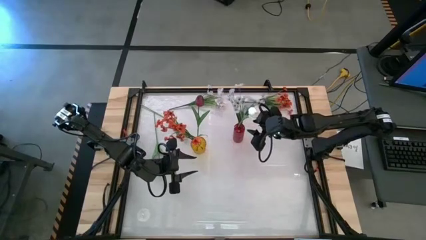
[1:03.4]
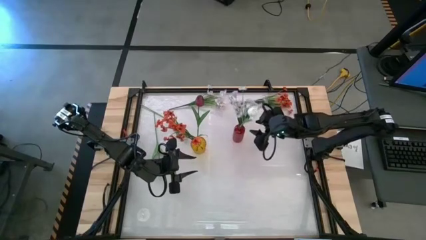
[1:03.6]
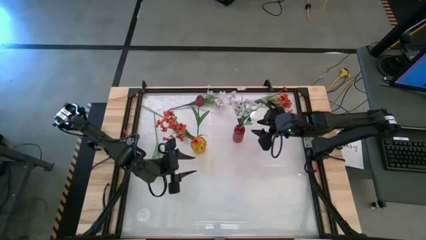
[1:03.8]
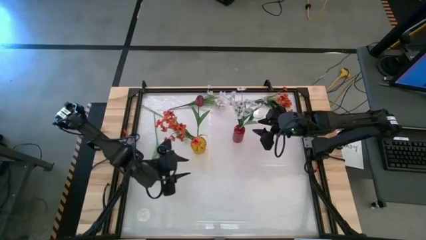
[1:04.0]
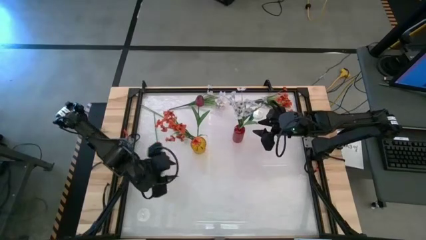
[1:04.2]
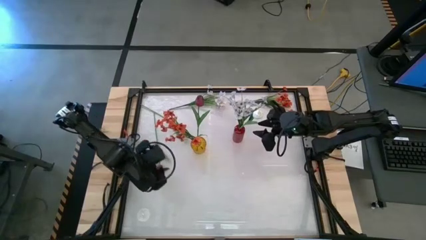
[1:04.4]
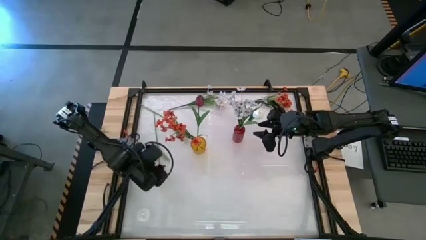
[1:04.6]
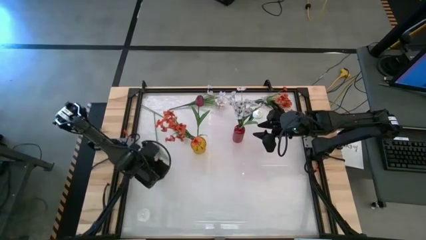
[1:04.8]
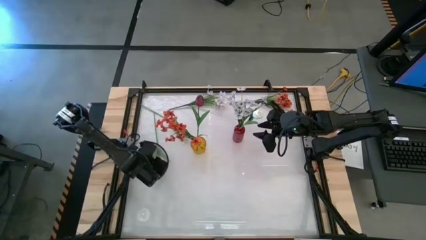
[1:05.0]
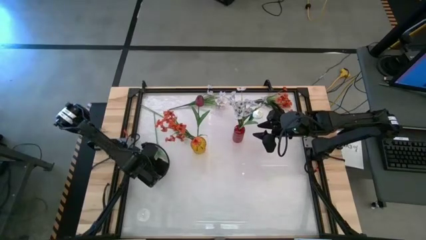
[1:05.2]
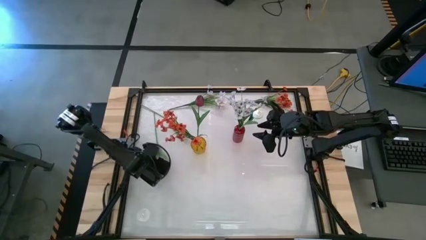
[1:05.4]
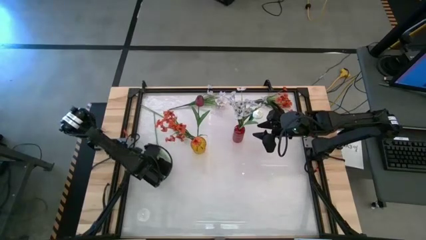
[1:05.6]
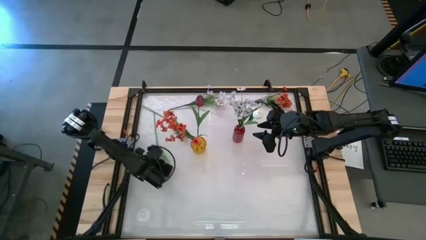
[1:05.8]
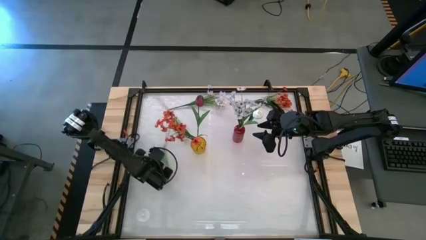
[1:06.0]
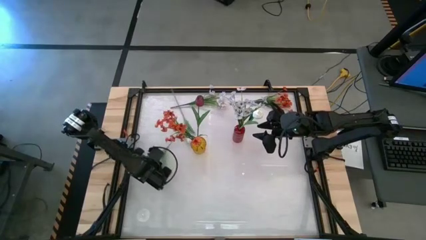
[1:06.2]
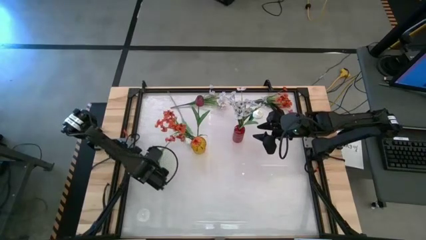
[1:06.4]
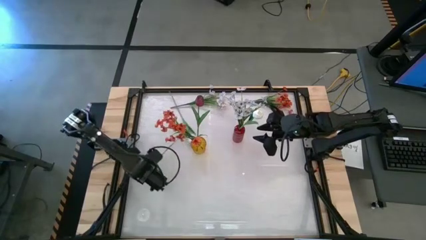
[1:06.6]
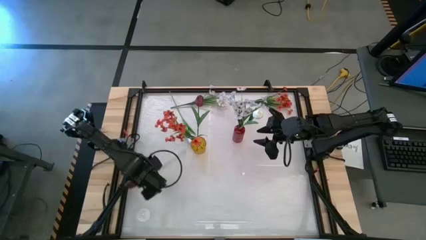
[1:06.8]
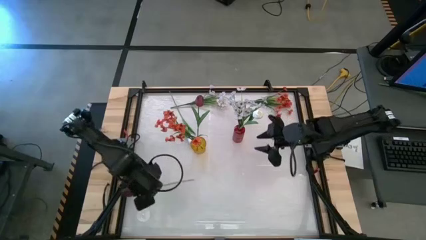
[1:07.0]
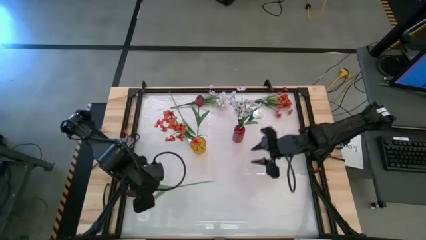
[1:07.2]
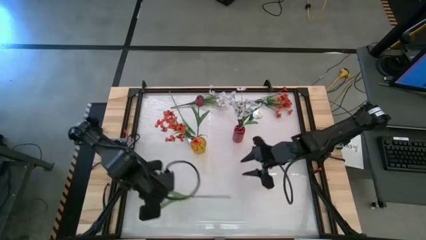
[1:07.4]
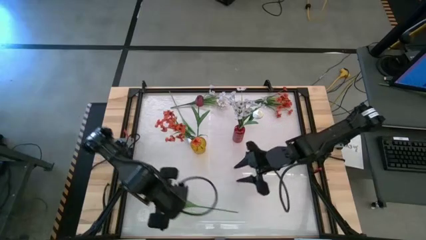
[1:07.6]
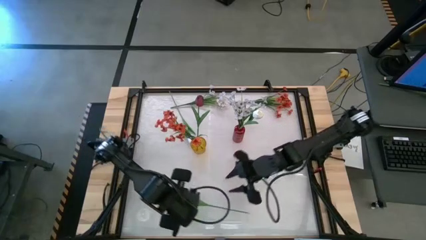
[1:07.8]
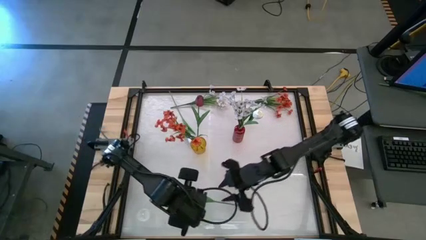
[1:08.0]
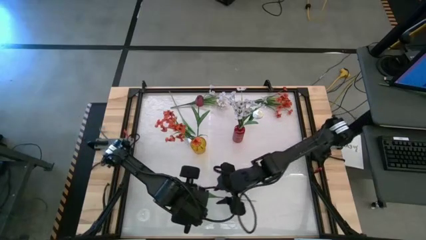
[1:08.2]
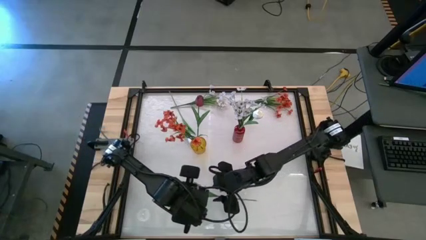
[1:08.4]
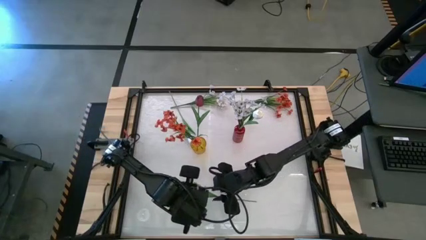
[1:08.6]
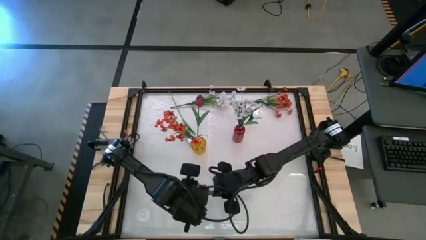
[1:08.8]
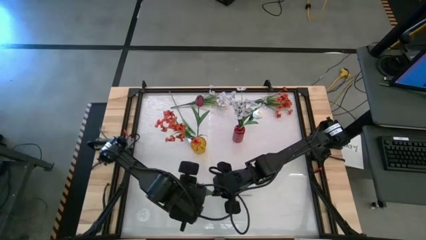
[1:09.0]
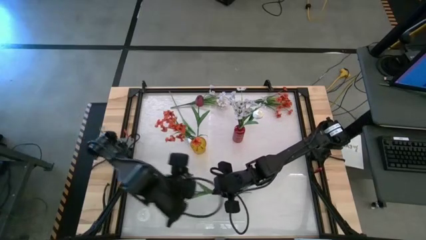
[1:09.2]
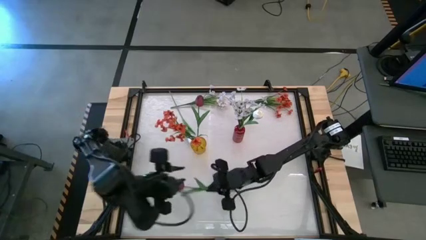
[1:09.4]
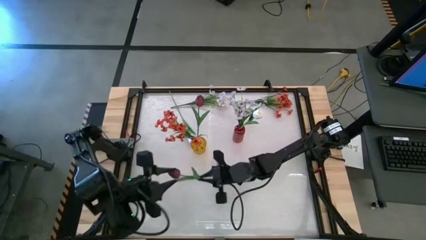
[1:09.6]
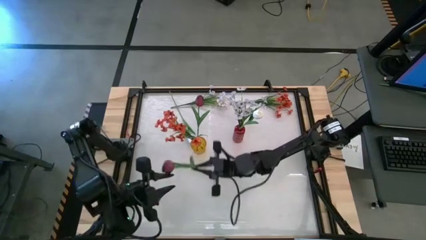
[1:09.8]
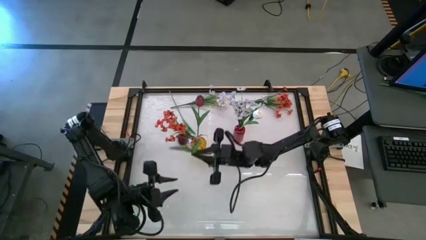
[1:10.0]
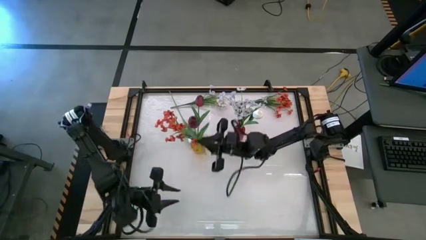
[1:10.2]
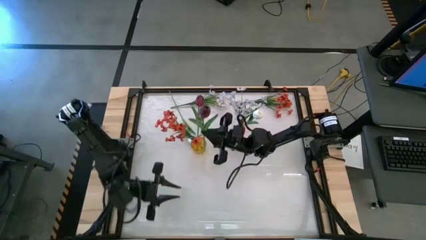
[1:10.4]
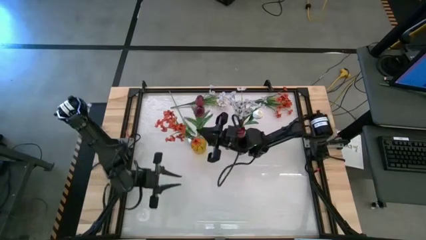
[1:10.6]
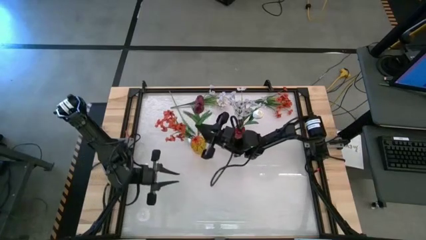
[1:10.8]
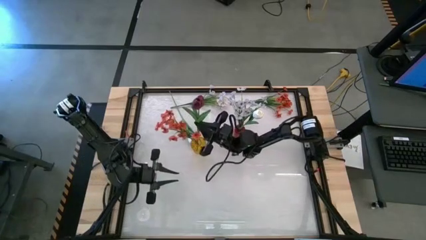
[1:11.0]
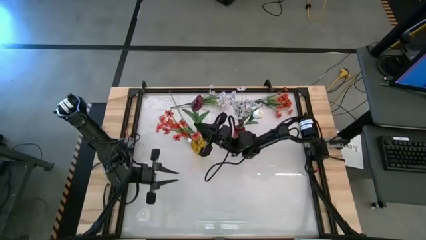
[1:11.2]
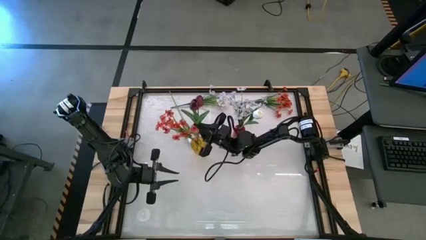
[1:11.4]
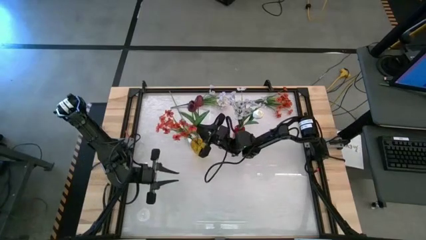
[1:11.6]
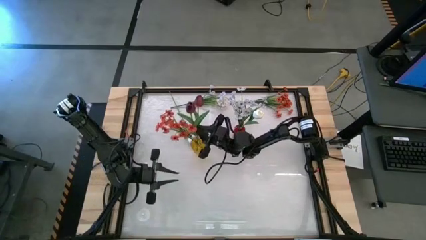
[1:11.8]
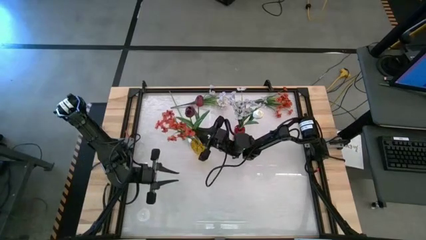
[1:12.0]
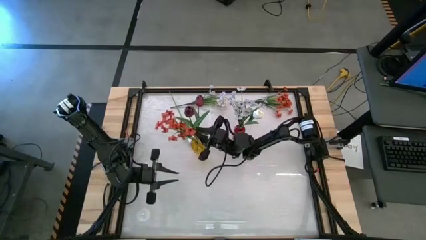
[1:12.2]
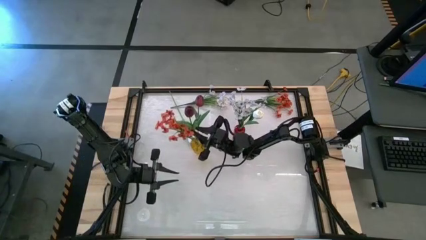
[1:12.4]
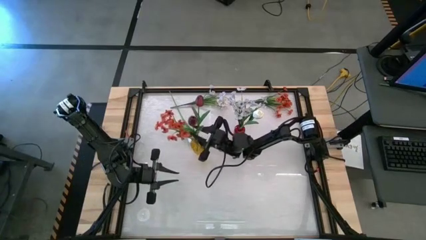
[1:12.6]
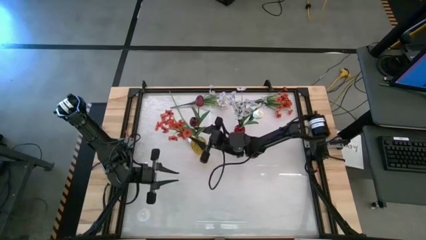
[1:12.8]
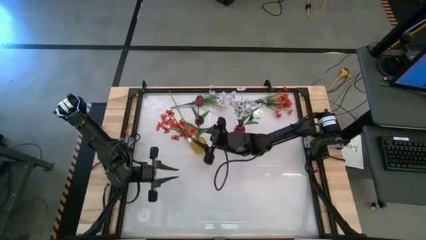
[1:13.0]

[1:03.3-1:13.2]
Task: Sort flowers into vase by color
Put the red tulip into the yellow flower vase

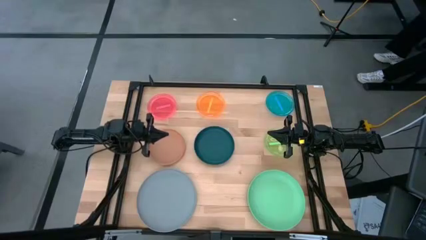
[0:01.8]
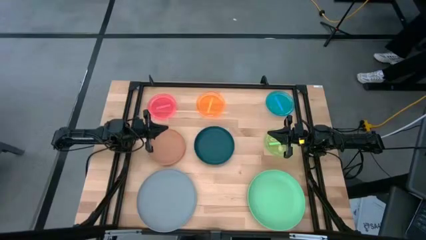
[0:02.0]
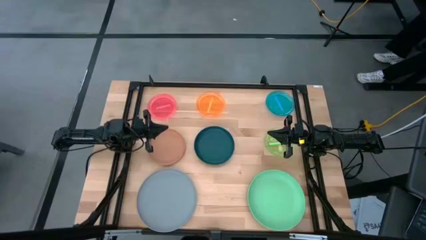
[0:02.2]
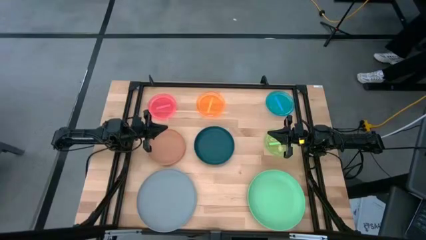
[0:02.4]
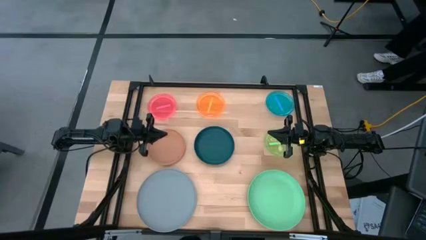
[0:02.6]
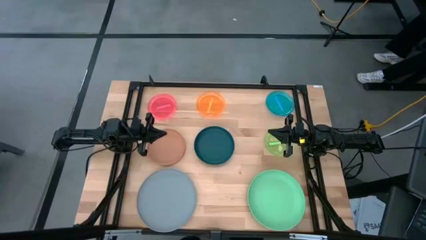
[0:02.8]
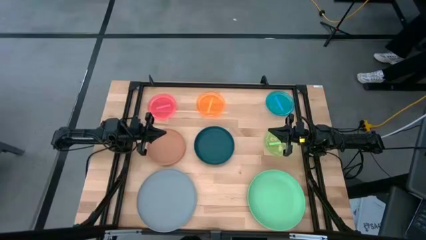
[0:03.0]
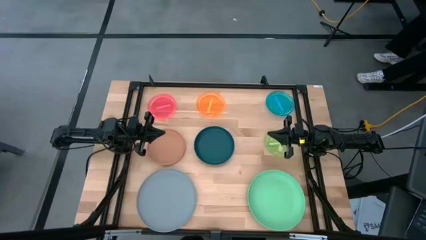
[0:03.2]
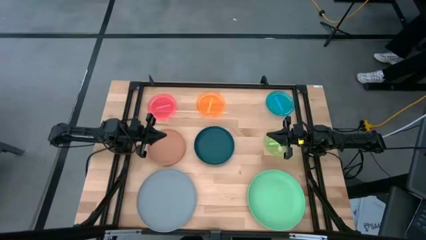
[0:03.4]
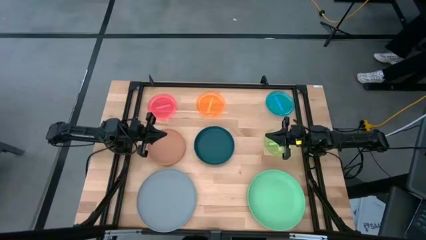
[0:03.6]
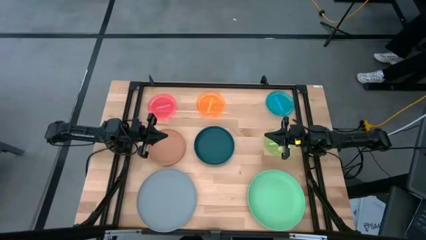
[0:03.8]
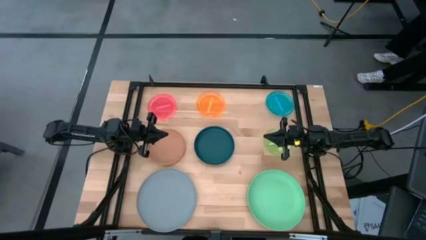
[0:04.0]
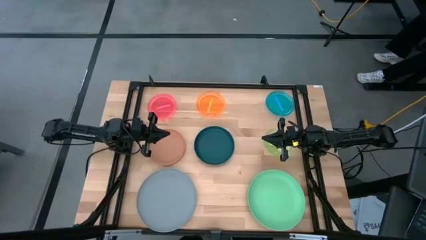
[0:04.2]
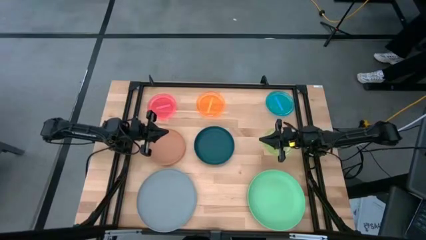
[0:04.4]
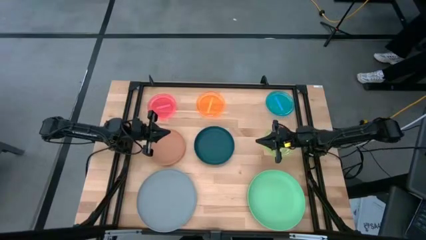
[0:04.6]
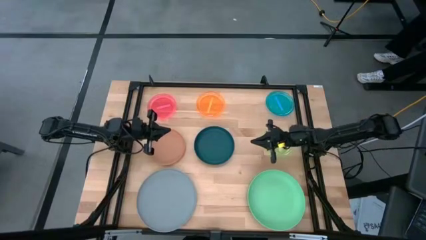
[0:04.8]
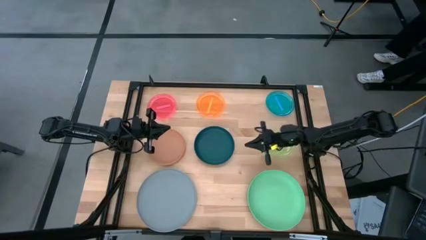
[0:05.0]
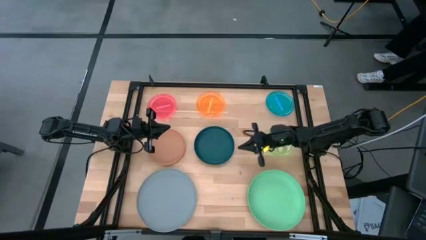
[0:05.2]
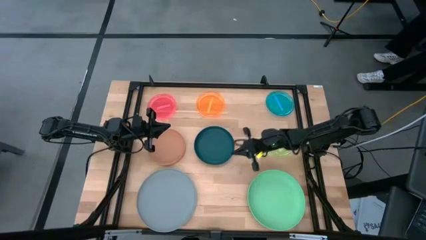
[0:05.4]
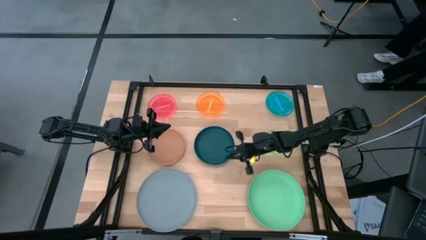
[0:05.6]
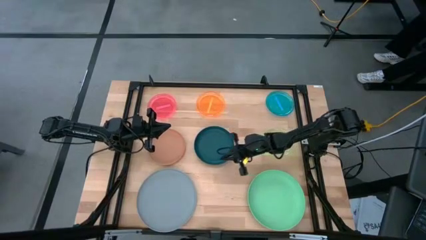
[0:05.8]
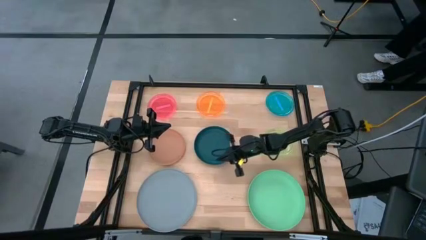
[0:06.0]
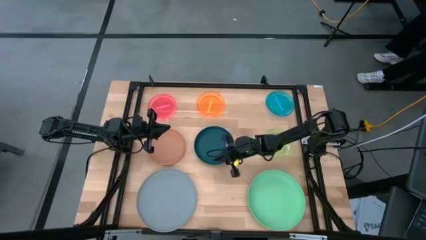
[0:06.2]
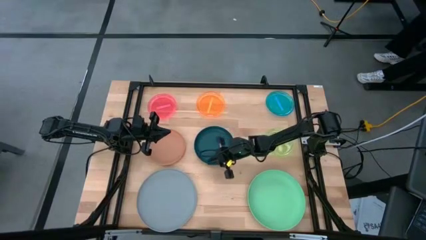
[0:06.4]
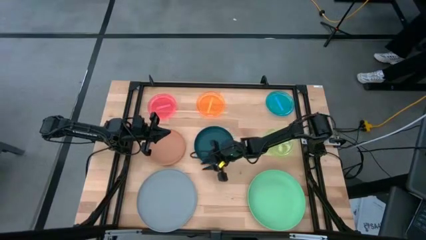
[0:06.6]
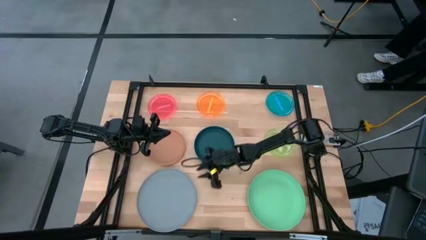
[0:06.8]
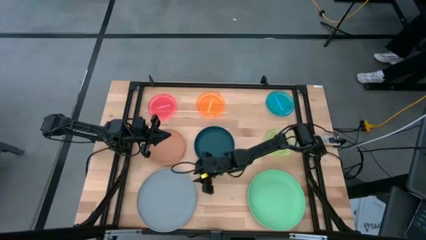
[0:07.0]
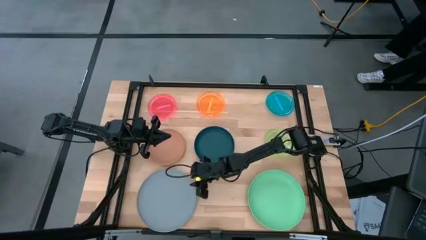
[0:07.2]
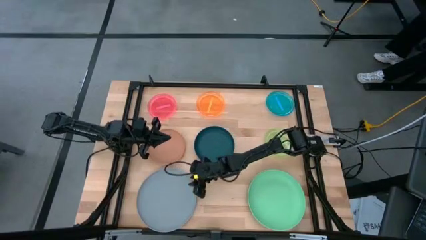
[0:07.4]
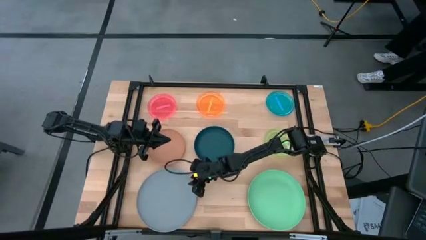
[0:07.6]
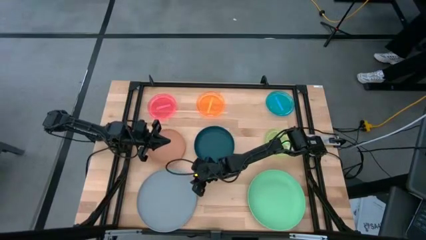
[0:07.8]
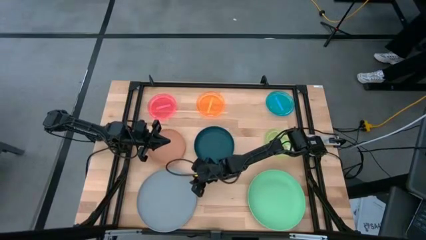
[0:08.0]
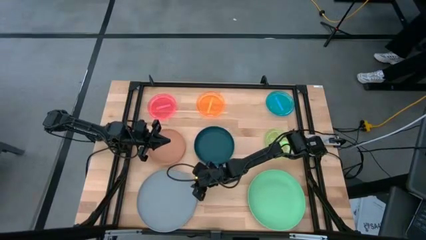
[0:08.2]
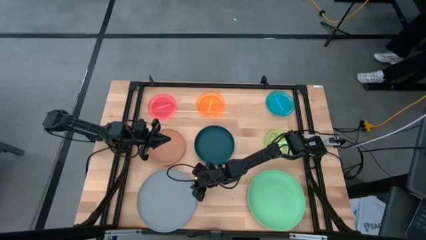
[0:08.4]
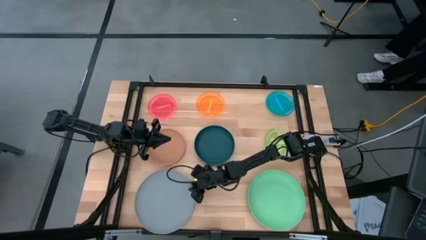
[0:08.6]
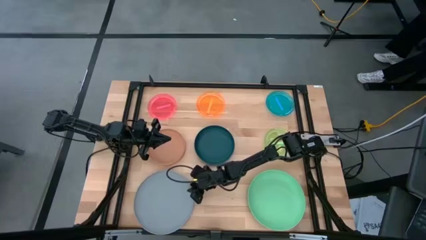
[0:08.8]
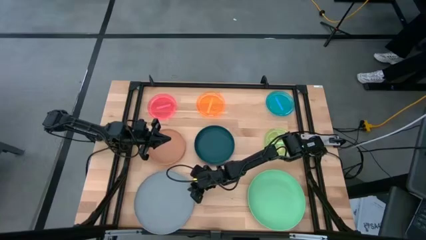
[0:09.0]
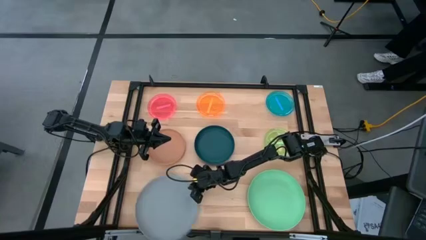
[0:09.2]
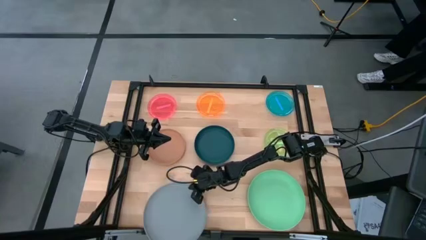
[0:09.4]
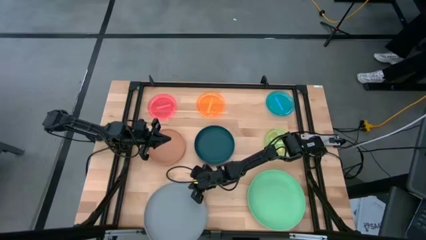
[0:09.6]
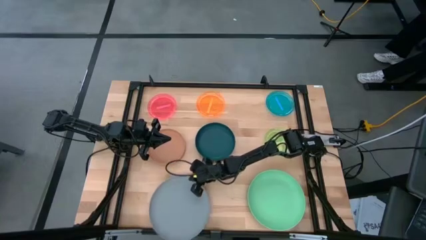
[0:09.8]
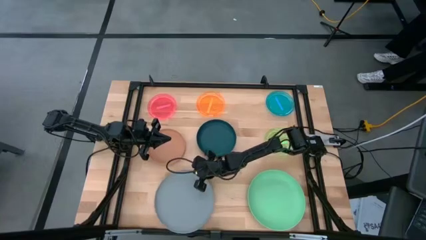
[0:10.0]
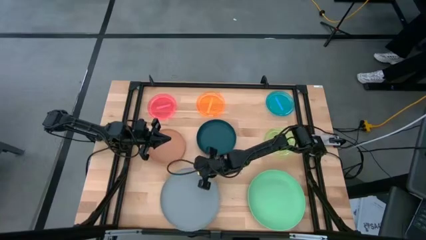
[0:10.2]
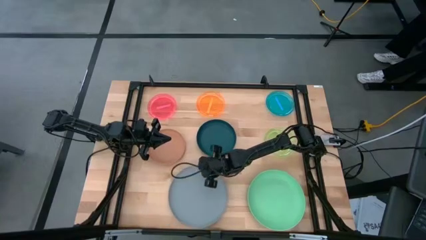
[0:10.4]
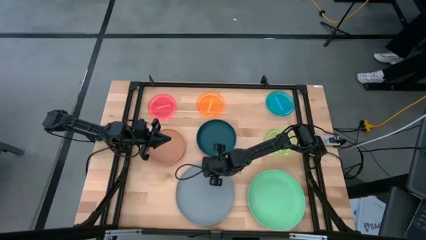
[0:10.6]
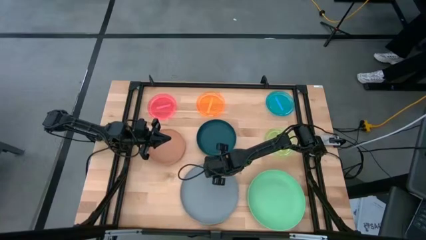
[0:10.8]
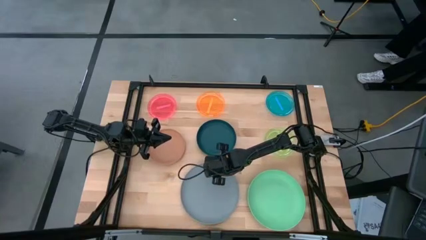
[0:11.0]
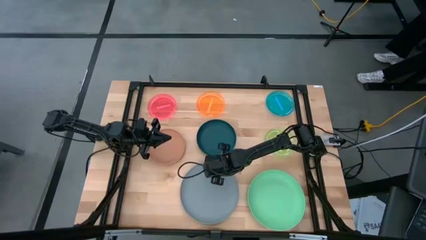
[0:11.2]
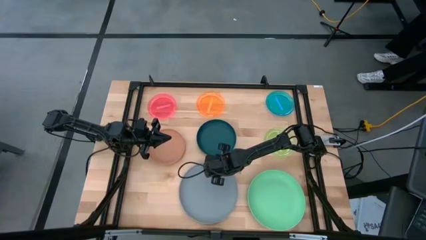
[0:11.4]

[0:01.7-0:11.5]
Task: Stack plastic plates
Adjust the gray plate
